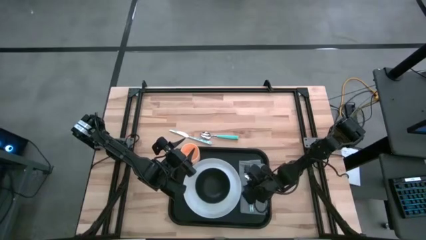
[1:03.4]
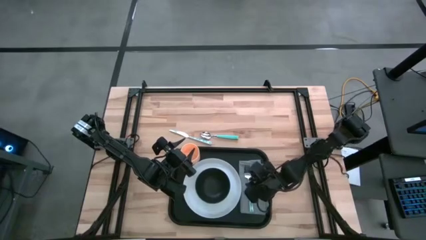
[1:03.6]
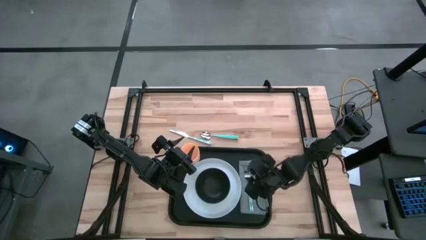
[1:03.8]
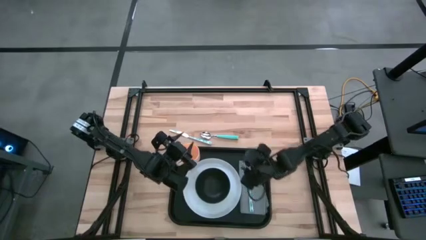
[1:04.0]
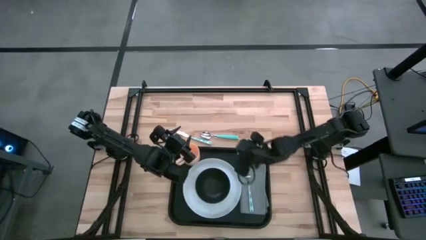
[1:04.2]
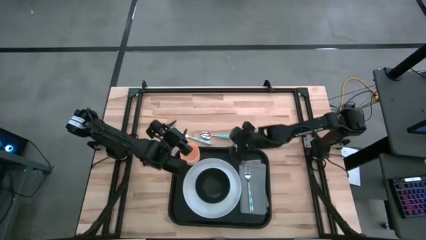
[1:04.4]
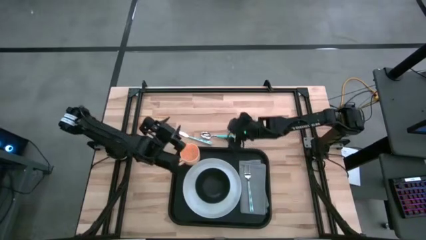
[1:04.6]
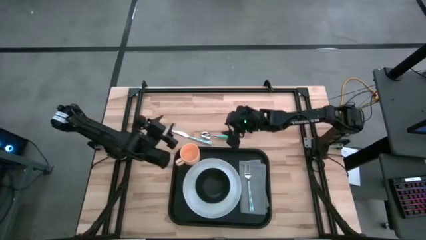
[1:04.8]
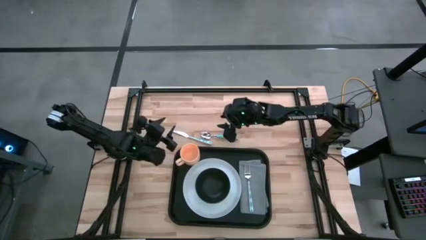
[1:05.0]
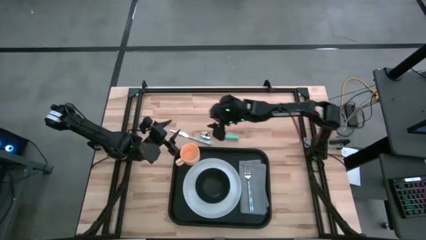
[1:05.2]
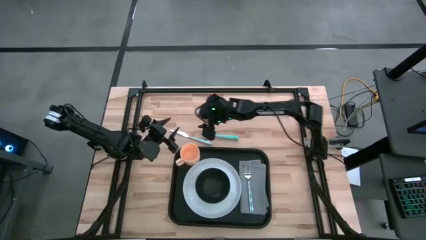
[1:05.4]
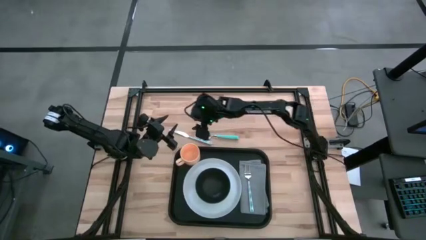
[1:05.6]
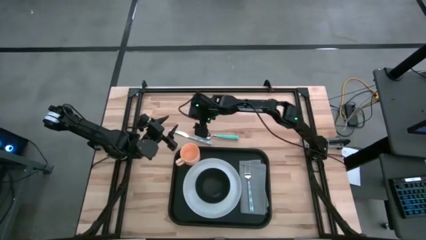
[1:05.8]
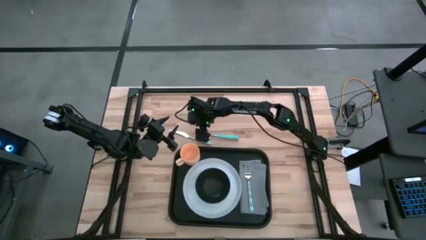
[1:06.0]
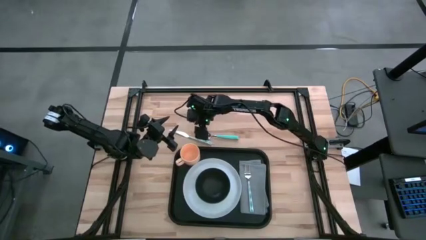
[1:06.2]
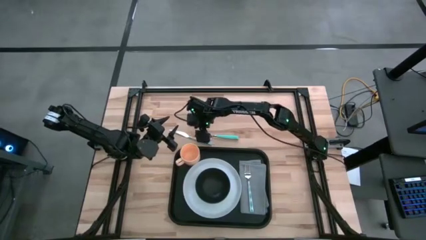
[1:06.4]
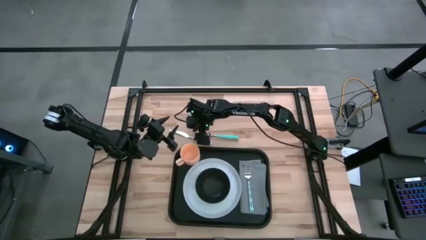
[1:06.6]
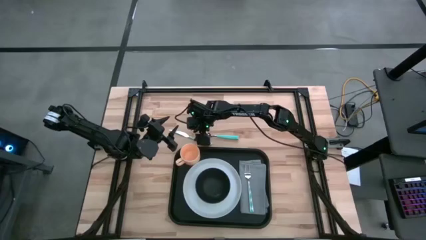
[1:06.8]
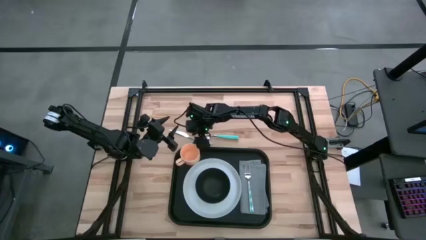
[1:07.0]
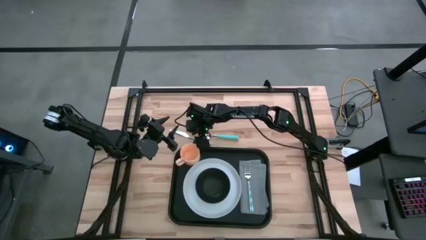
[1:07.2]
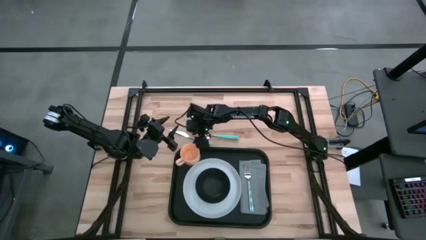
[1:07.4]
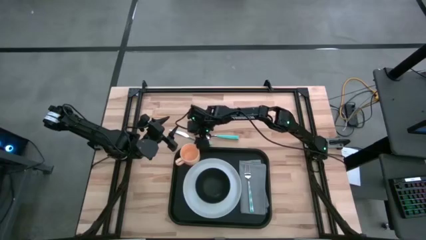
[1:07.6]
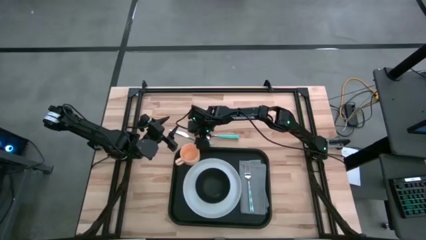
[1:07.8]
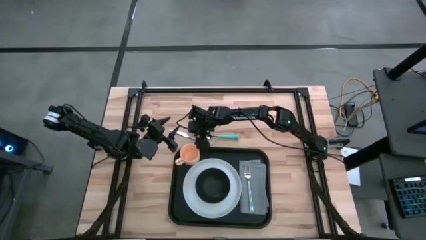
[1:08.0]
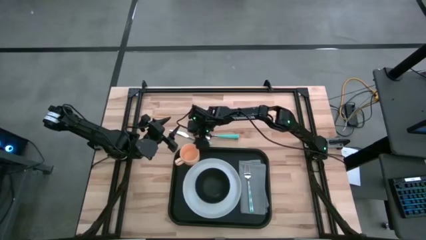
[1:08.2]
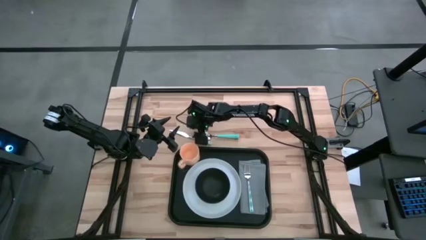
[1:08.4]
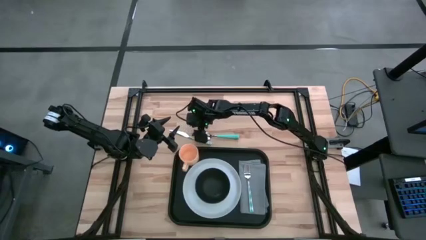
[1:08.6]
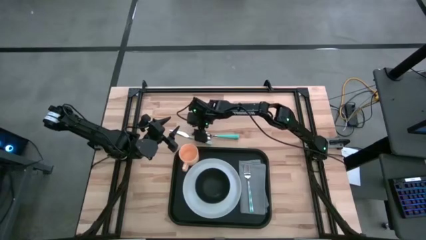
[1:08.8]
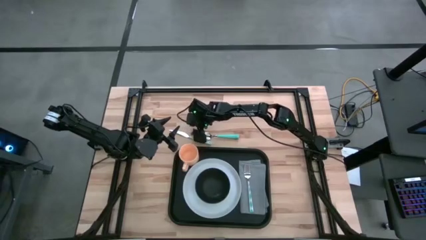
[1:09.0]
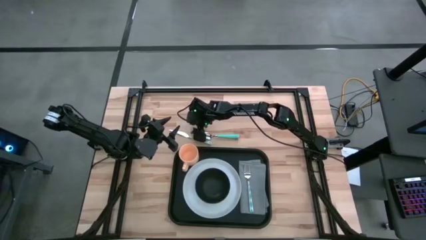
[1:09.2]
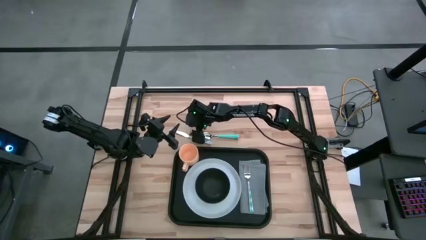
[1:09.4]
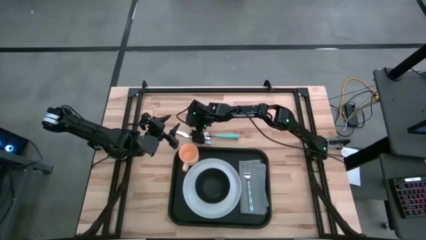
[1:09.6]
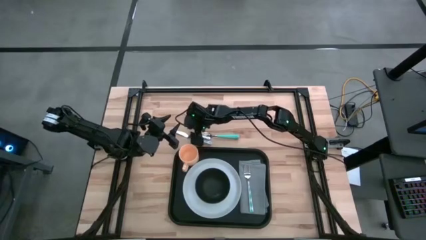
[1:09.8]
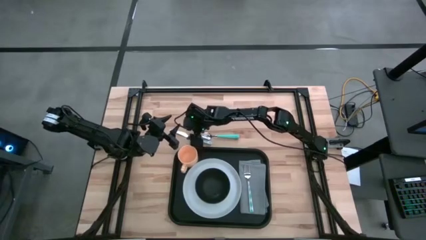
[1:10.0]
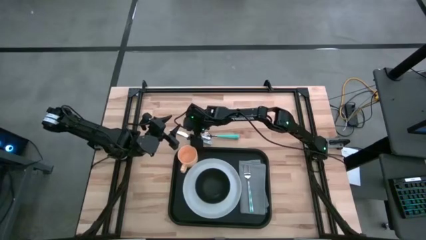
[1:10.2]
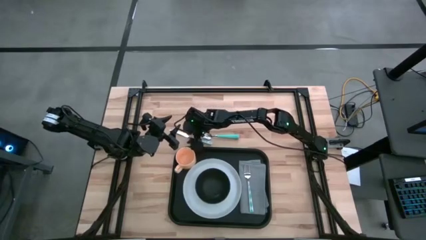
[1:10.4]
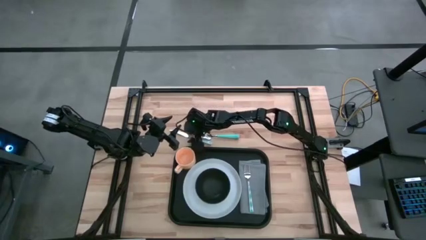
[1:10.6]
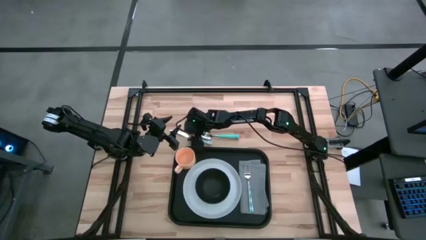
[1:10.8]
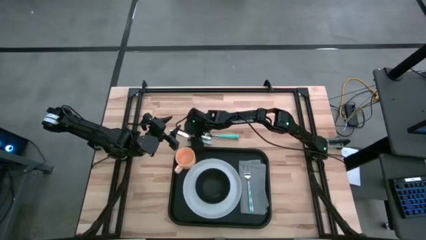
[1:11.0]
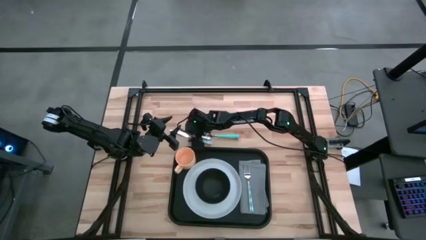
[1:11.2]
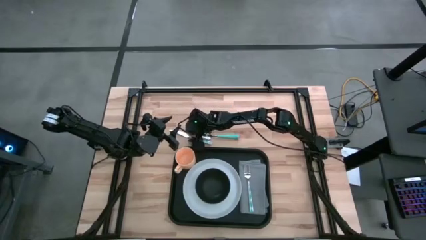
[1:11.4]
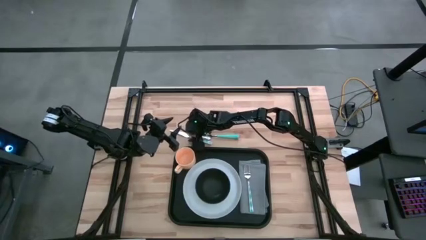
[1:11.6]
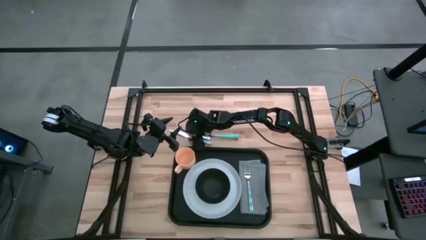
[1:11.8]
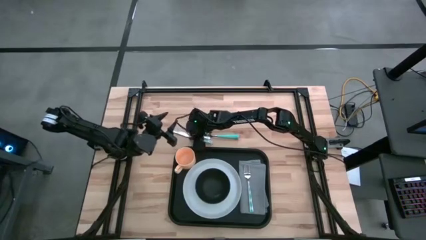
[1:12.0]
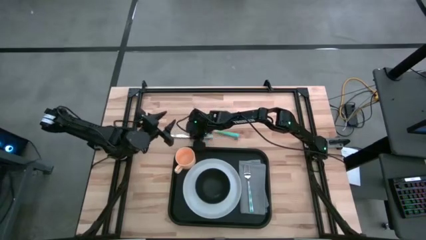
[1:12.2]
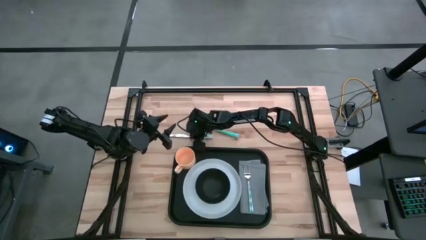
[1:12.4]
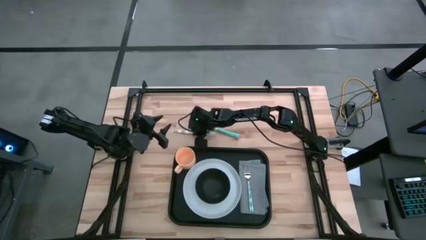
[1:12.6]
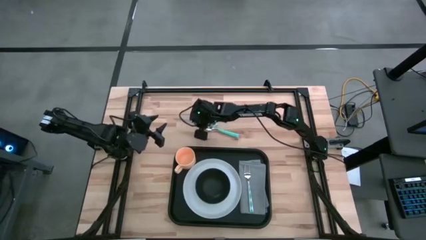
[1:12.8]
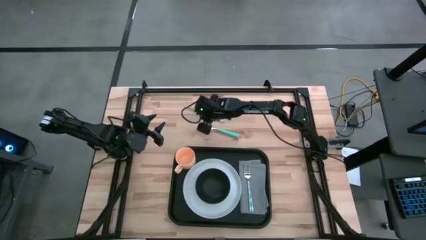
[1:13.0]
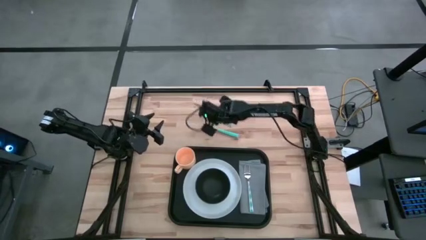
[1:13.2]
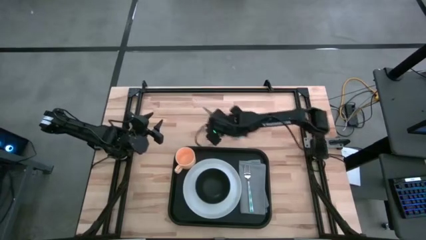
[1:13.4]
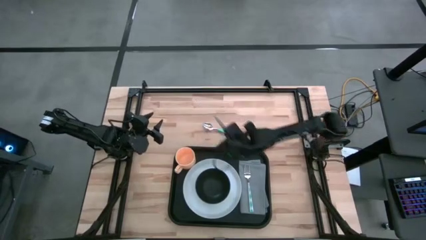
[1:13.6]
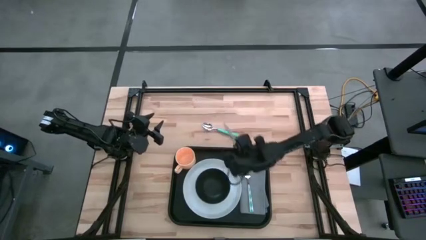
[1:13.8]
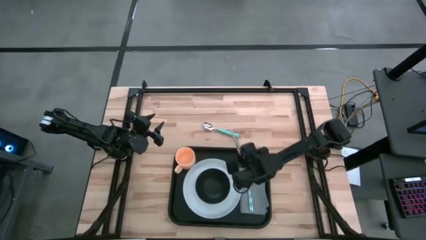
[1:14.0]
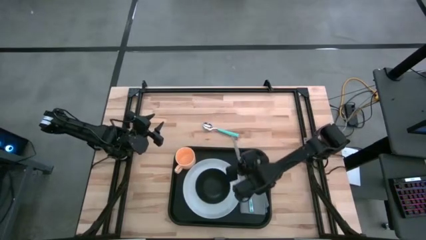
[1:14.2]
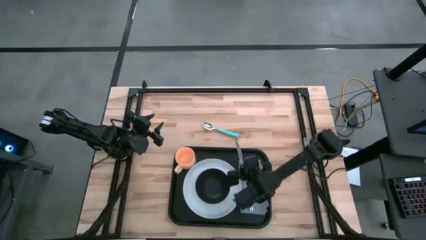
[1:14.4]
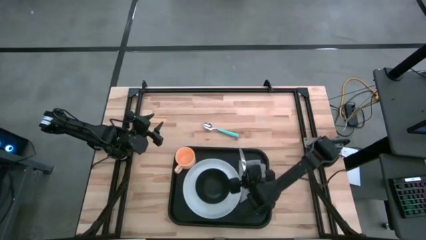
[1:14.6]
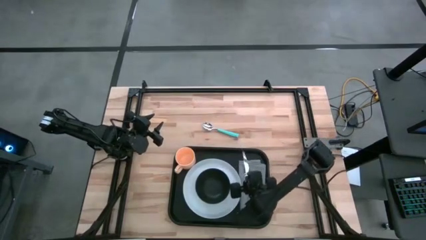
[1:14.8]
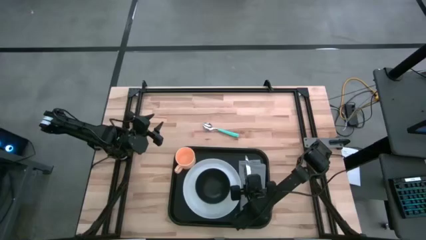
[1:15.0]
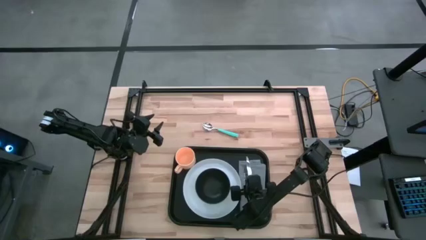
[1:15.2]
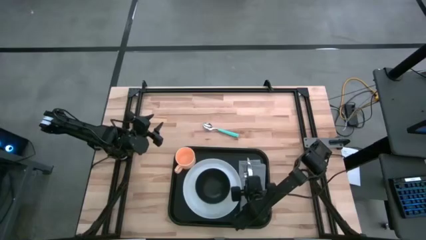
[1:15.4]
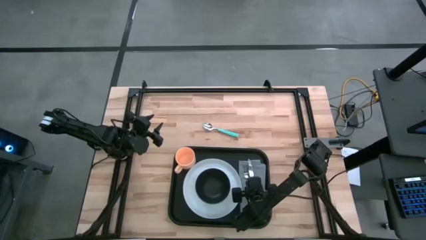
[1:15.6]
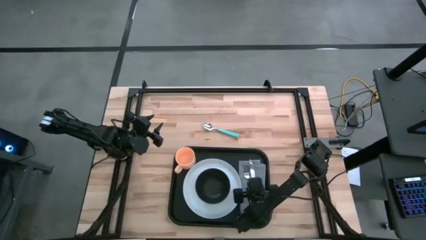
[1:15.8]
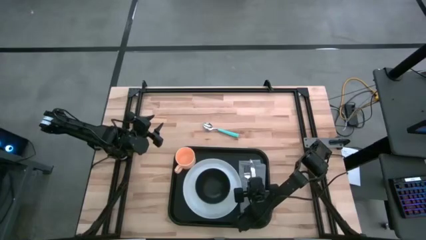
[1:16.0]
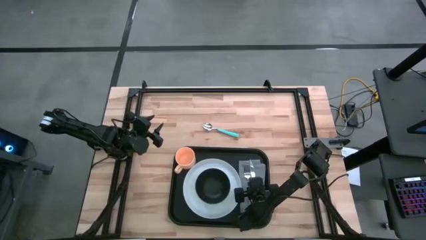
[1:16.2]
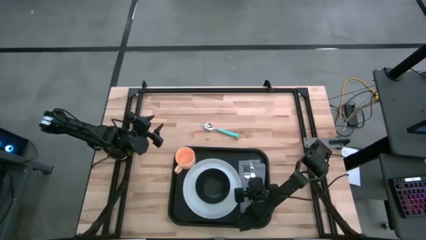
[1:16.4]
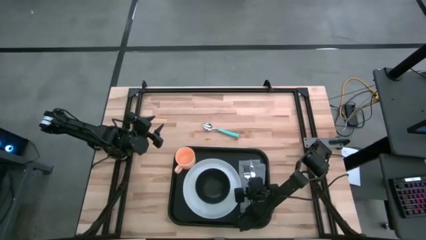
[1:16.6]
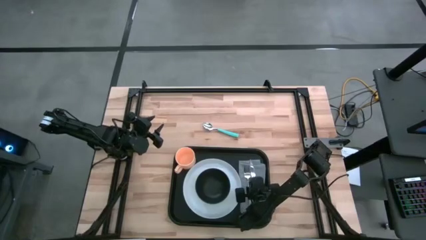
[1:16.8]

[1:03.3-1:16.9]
Task: Set up tray
Put the blue knife on the gray napkin to the right of the fork on the black tray
